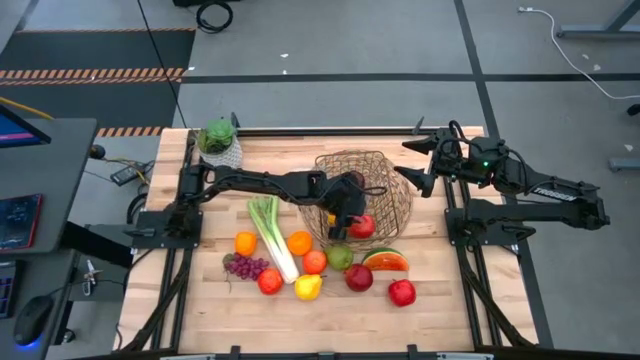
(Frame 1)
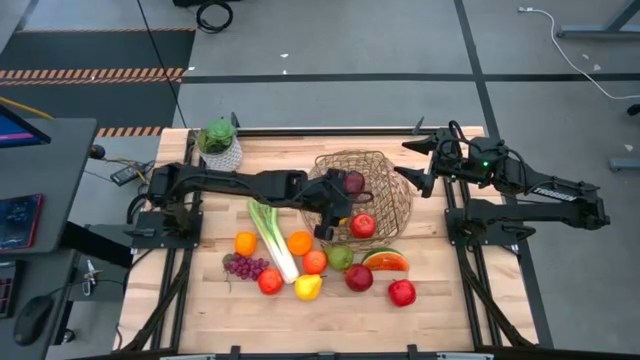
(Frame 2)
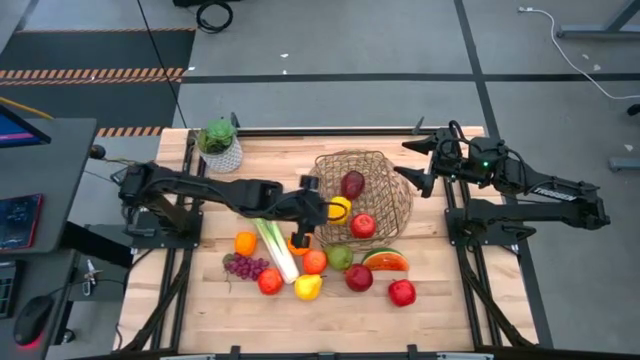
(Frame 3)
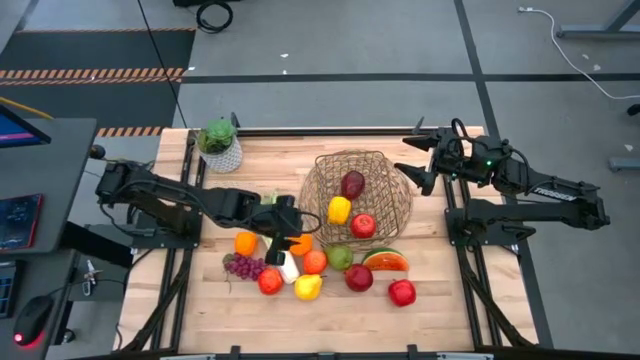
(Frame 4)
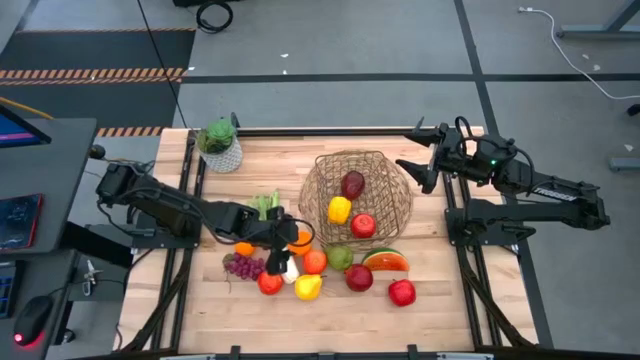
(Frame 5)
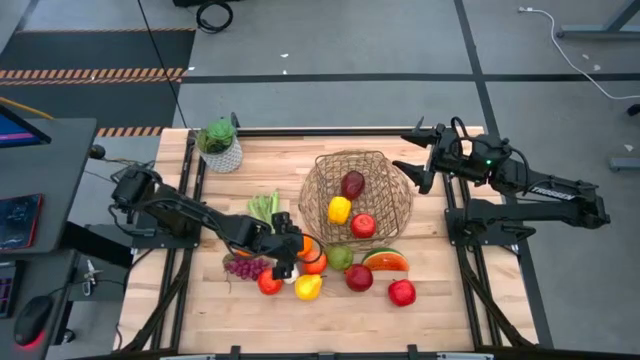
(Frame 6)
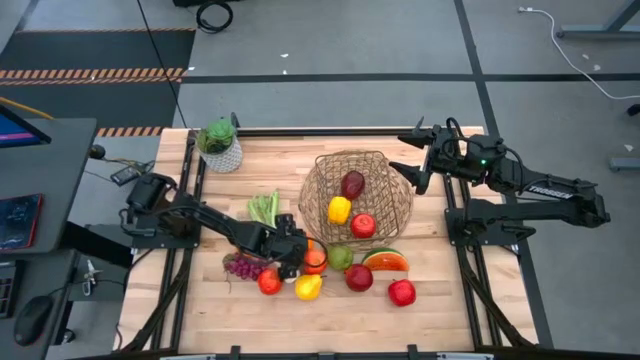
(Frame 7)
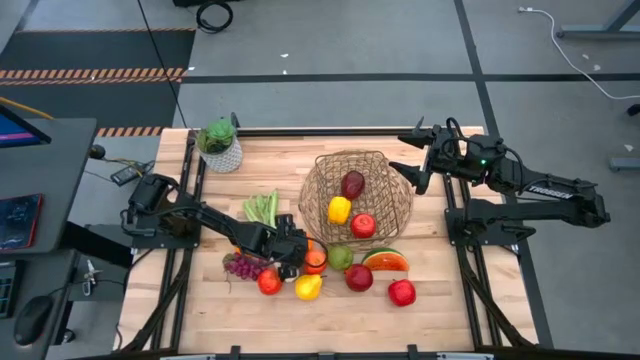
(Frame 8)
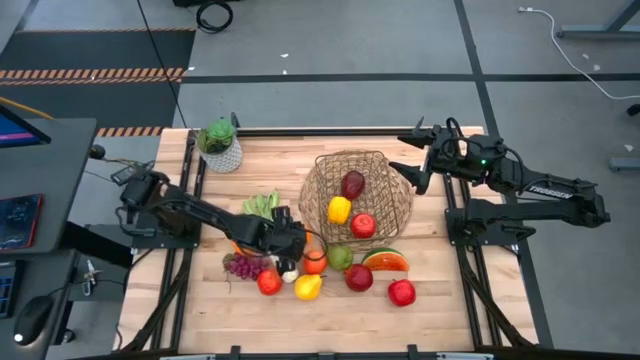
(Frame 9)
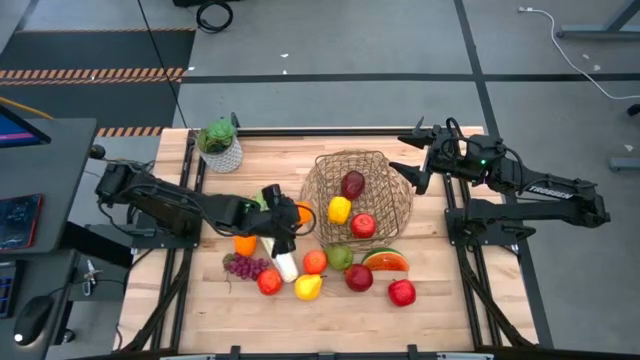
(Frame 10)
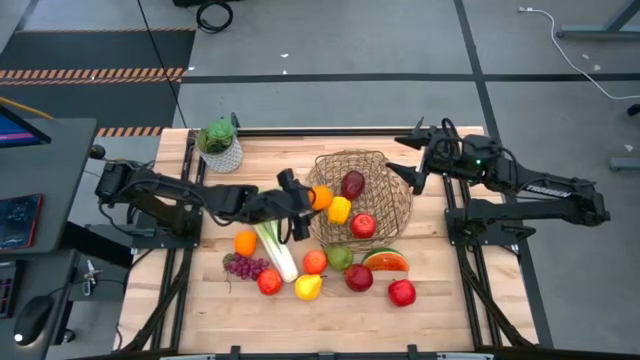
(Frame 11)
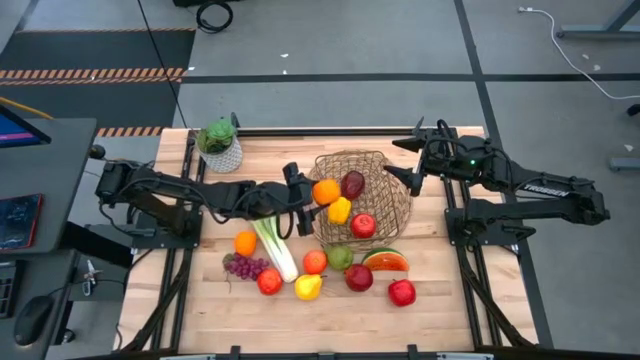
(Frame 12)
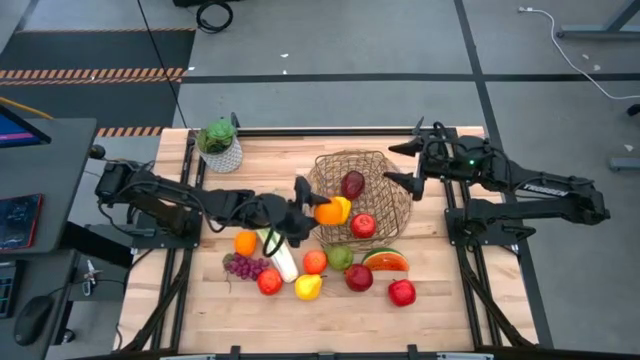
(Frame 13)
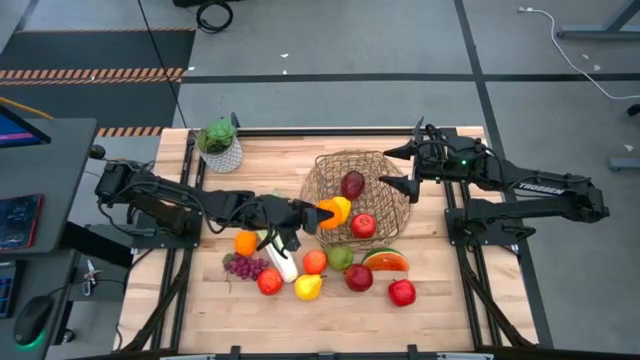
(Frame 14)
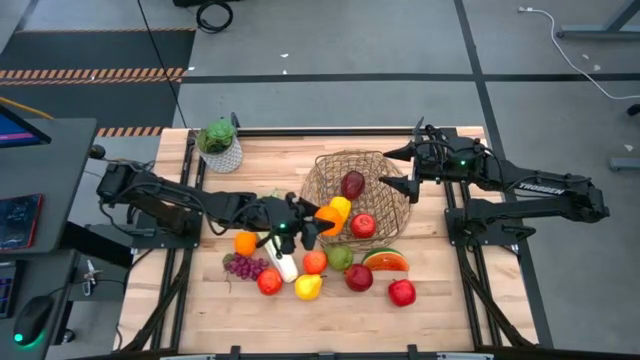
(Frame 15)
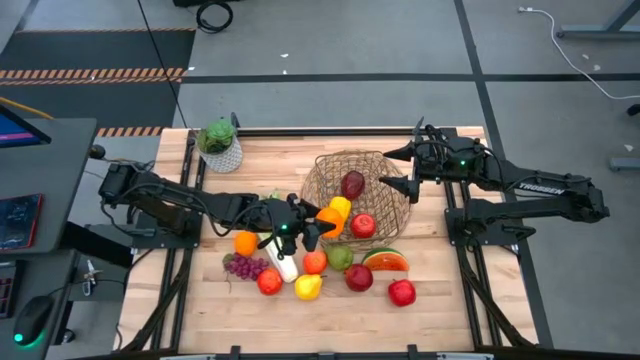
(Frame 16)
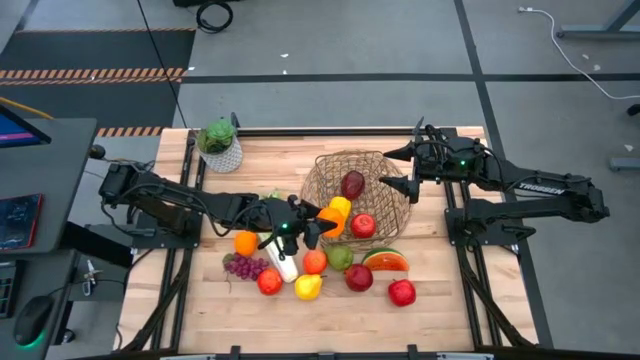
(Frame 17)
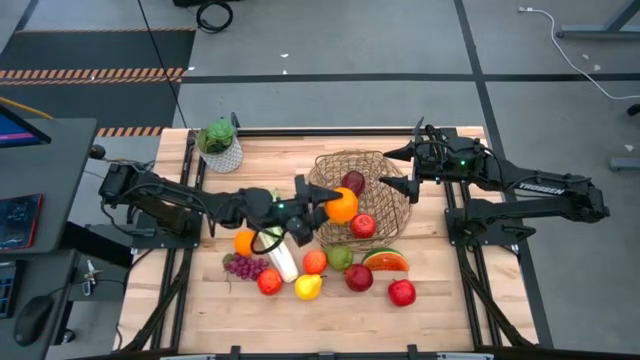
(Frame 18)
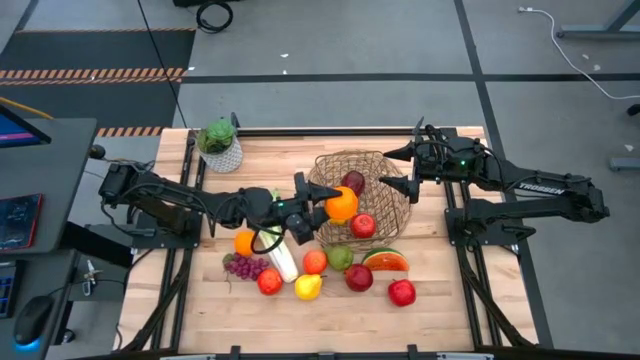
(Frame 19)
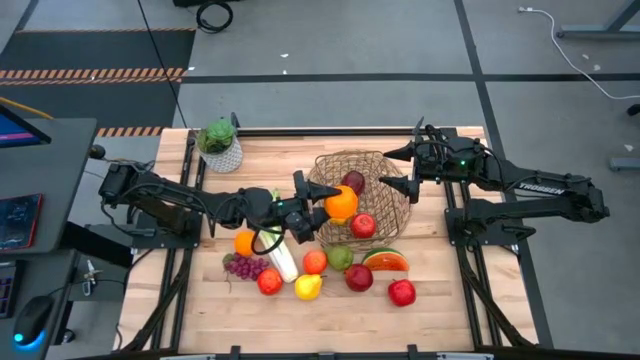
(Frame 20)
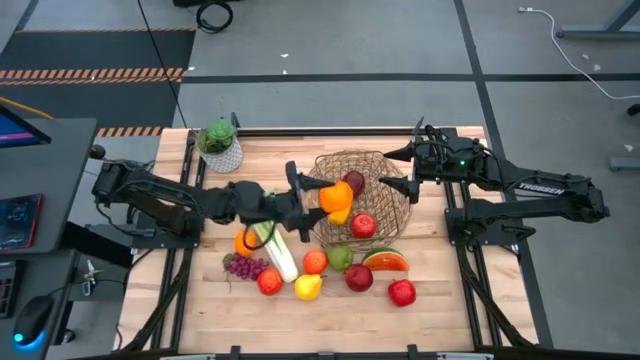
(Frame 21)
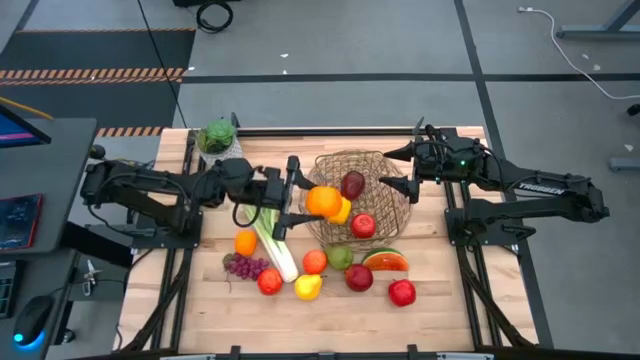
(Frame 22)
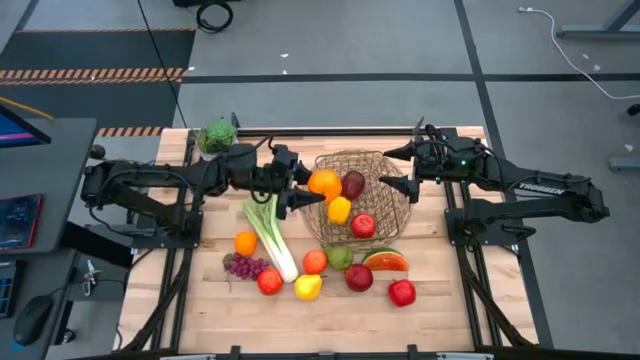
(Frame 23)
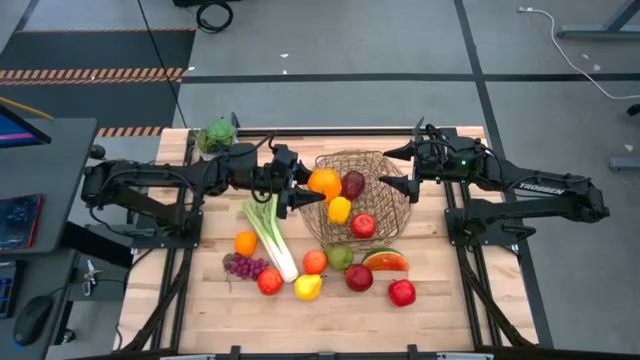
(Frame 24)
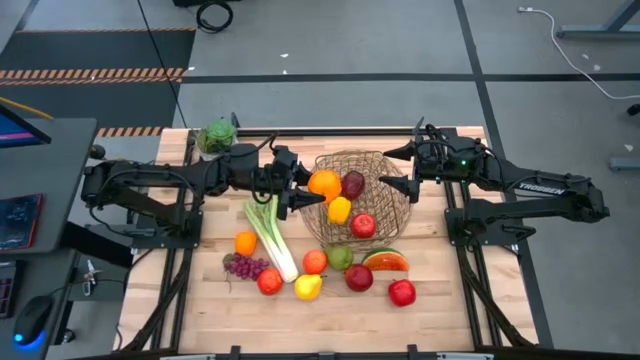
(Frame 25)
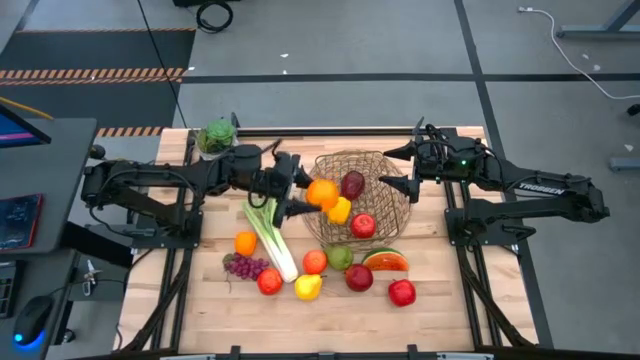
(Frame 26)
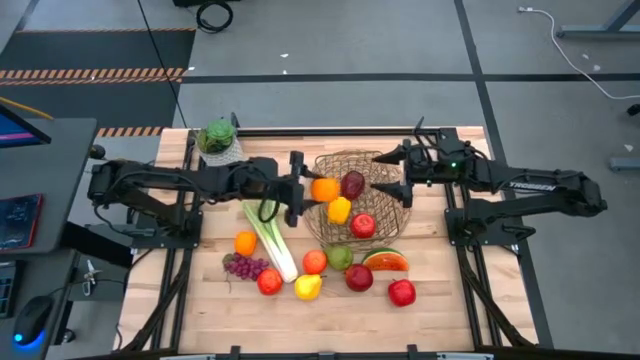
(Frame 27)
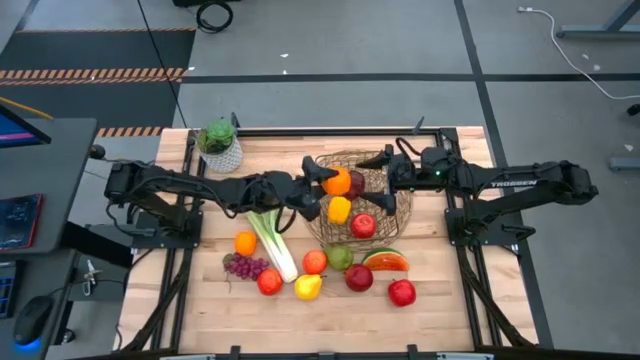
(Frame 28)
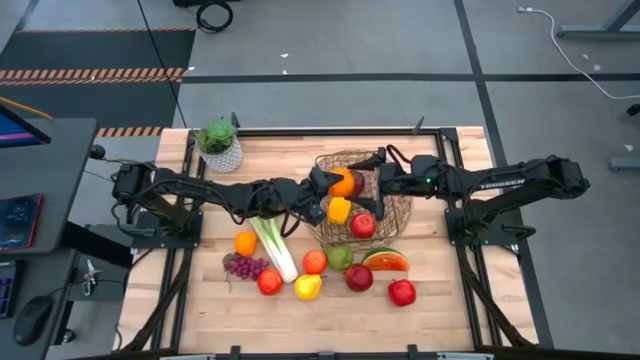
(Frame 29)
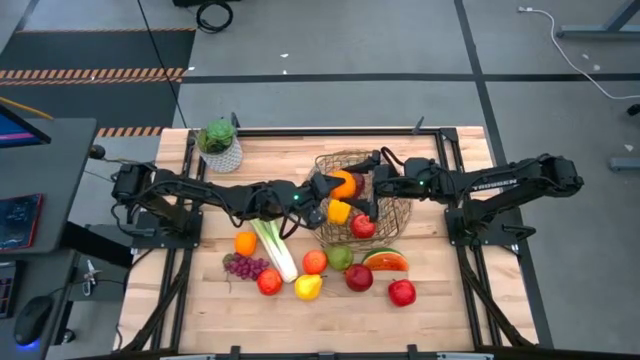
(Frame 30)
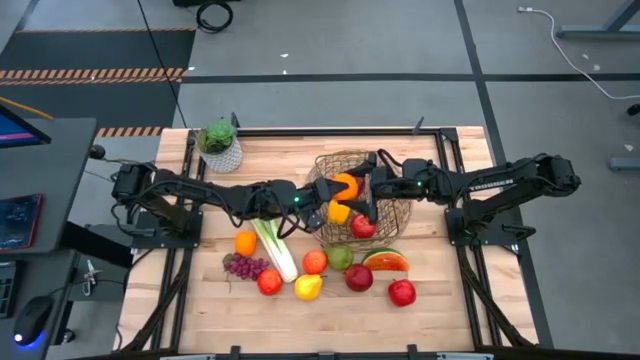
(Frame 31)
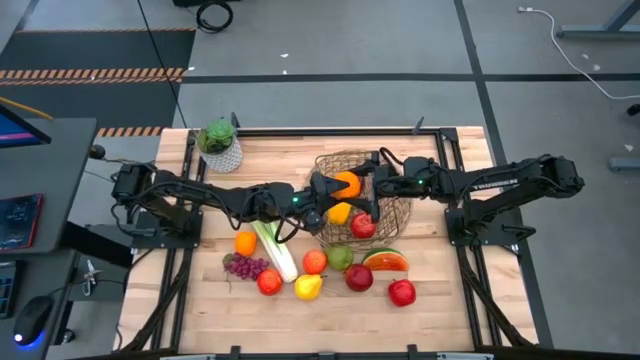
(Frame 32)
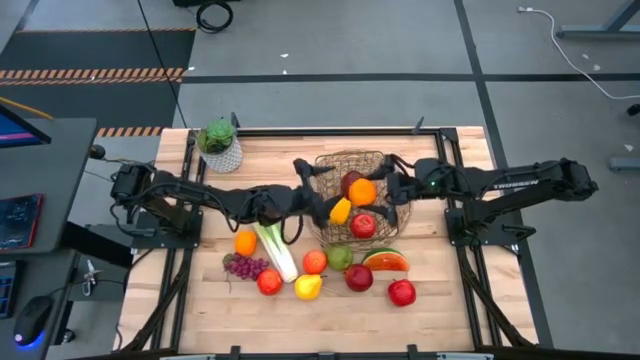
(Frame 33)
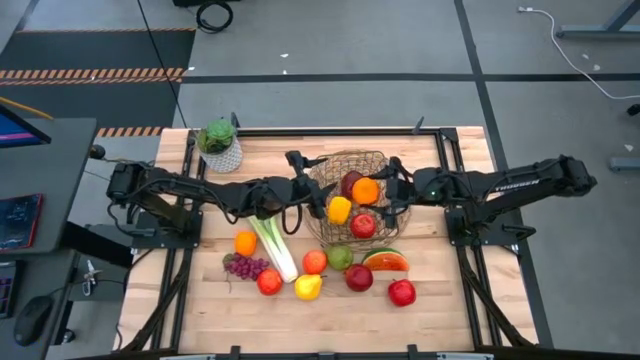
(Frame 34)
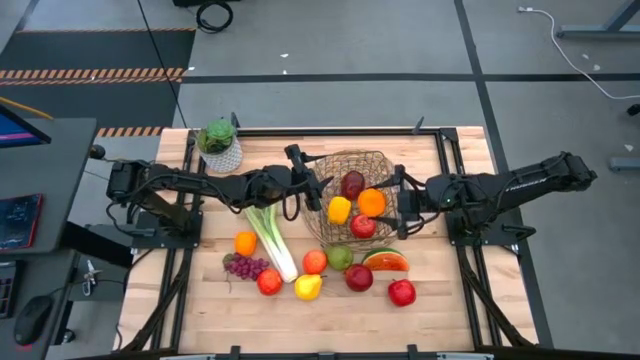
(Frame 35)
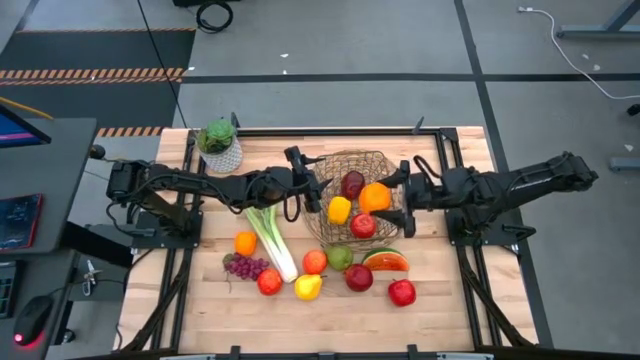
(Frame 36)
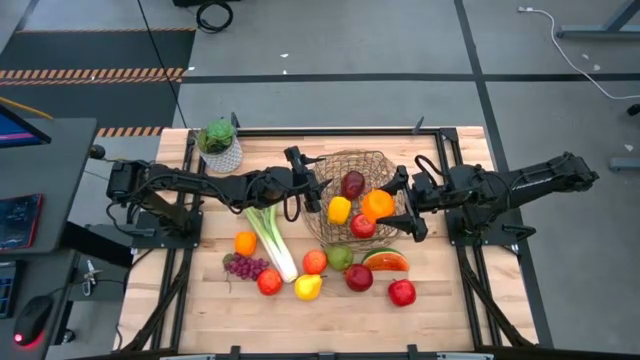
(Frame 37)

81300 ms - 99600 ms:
Task: Build produce basket
Put the orange into the brown wire basket
